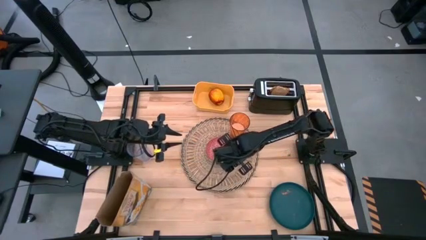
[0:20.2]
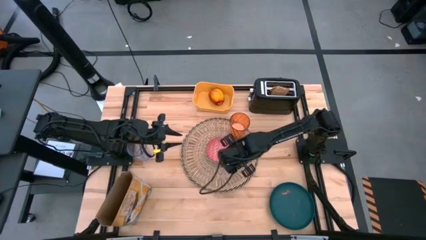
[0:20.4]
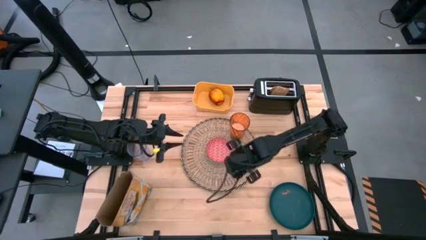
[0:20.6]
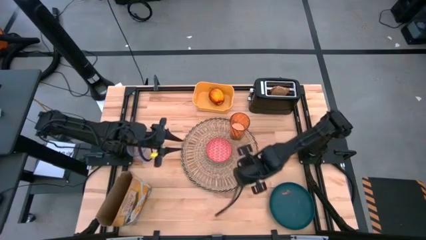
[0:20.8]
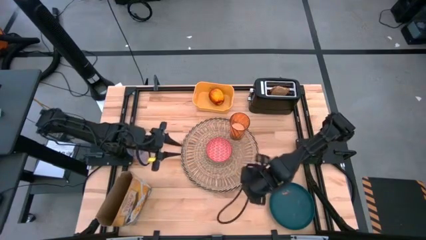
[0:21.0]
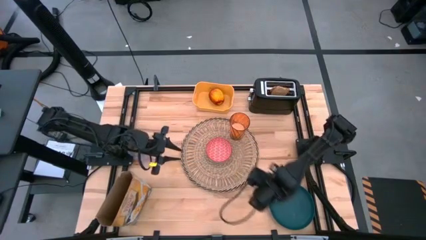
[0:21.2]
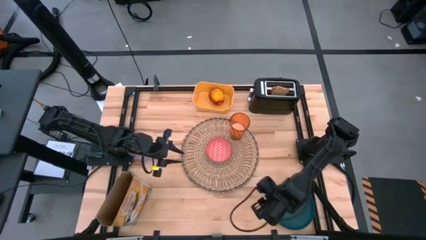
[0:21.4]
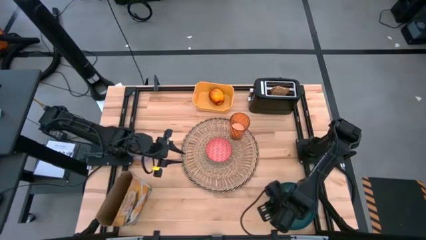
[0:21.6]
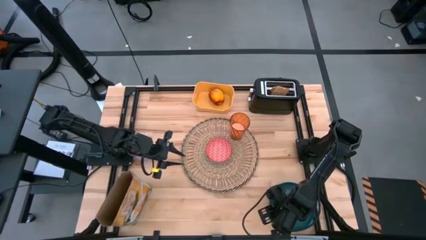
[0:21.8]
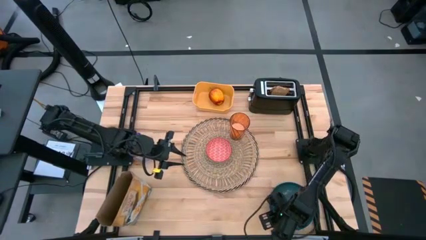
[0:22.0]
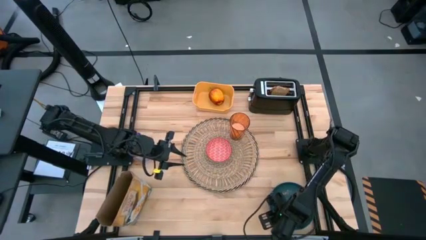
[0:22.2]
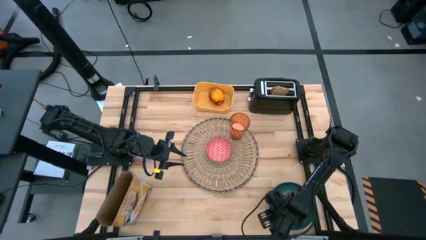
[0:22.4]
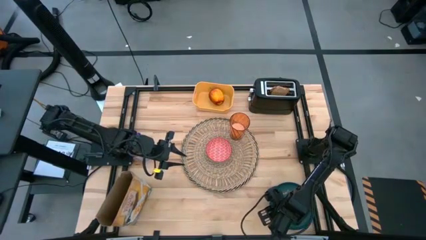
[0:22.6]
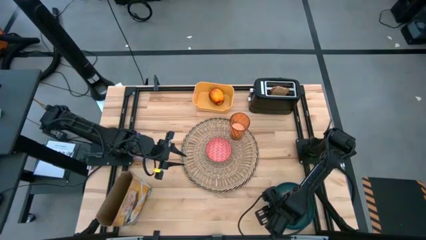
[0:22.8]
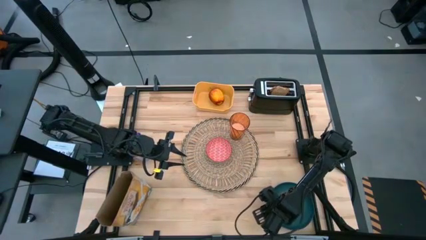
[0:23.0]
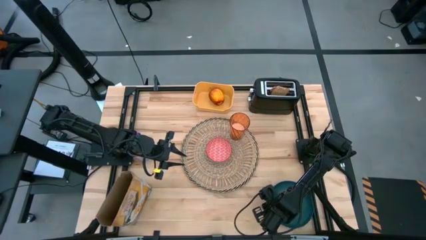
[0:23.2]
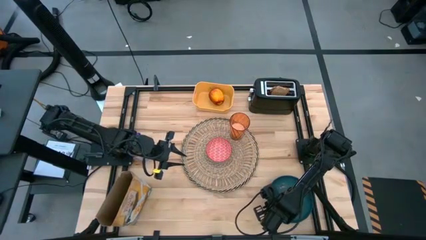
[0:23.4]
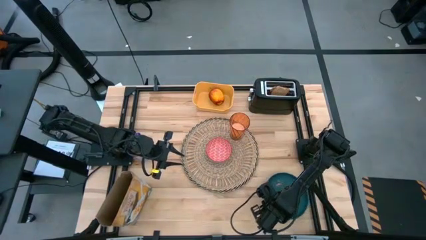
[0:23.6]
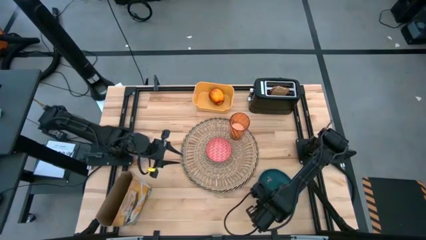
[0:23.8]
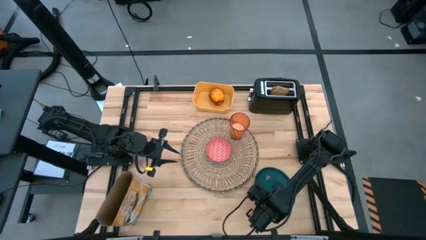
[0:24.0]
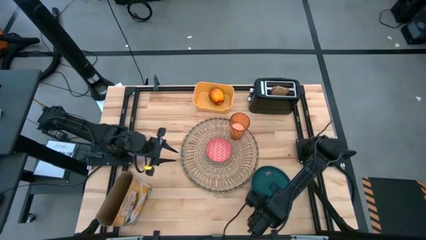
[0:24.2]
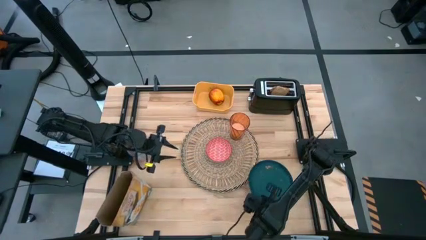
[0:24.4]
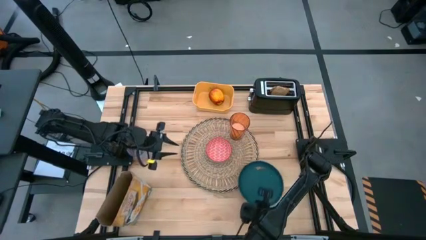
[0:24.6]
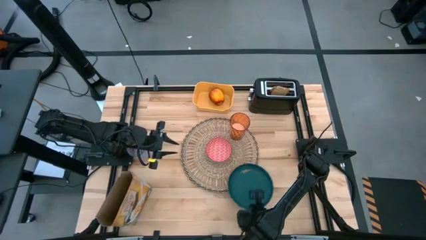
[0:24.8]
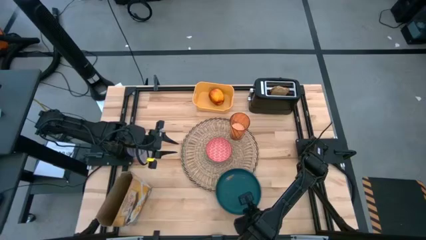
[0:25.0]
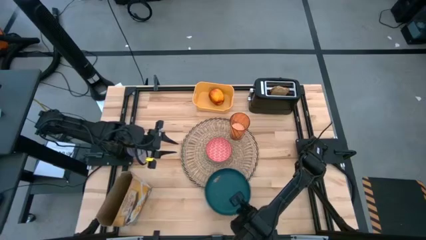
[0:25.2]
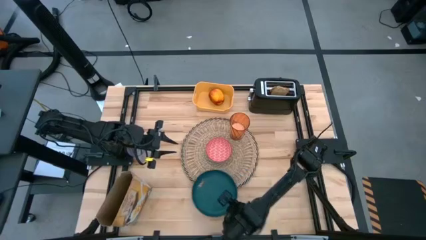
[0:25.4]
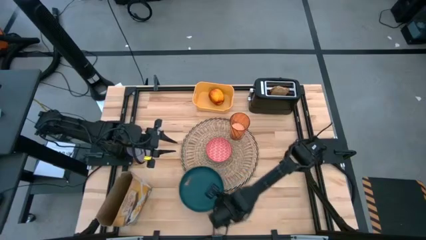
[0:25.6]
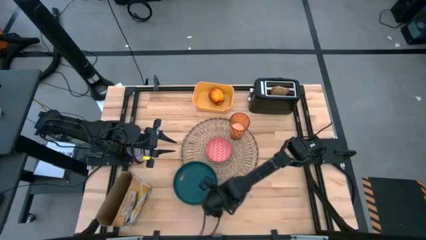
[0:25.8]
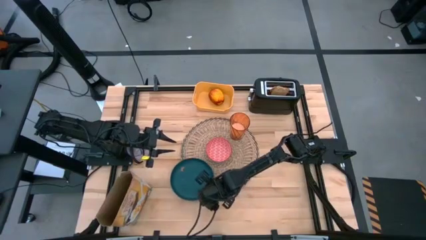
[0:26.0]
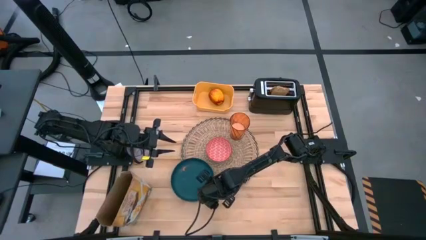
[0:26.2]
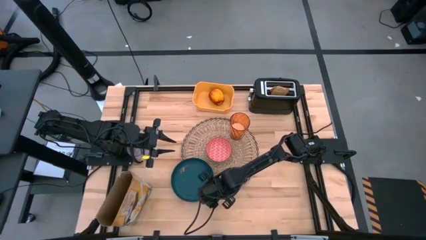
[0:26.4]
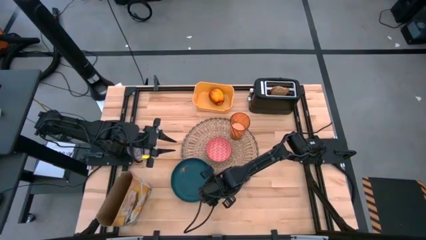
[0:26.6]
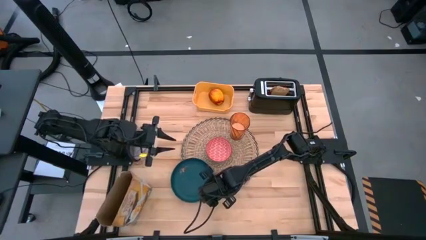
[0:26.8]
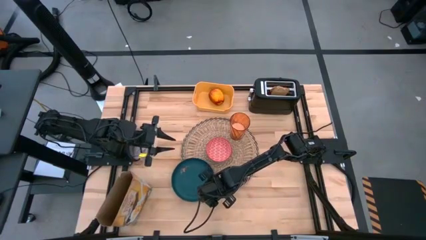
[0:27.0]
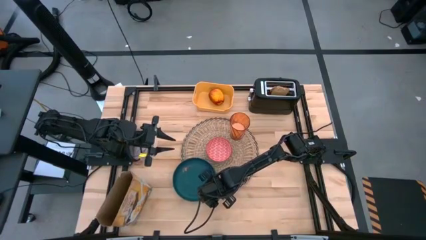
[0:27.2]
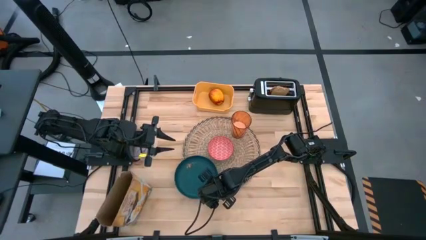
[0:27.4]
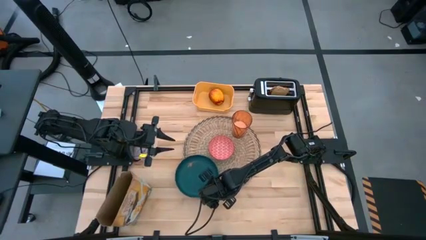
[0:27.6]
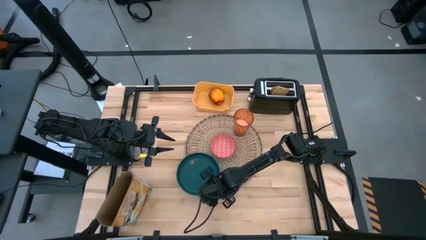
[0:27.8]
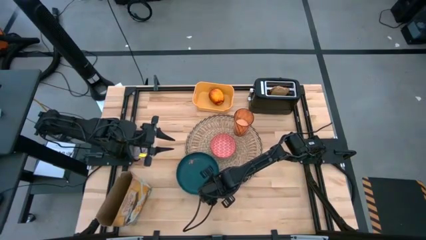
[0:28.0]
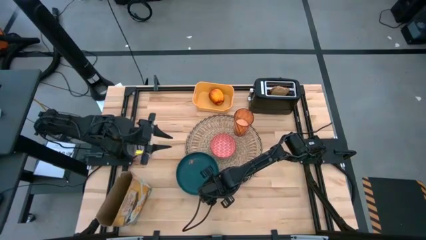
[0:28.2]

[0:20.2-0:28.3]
Task: Arrange a breakfast setting
Put the dark green plate on the brown table mat

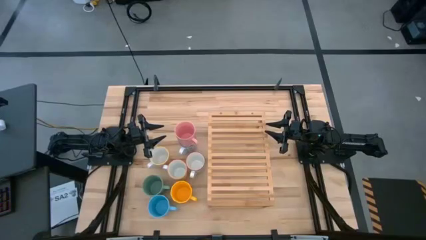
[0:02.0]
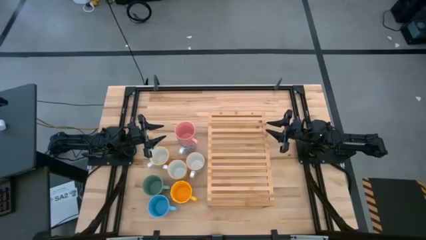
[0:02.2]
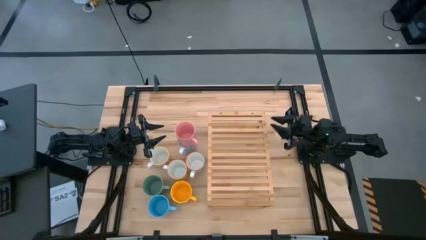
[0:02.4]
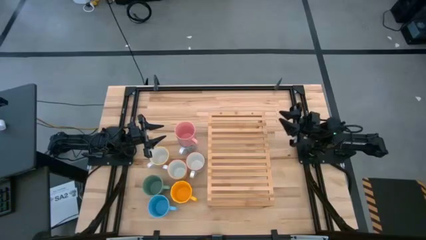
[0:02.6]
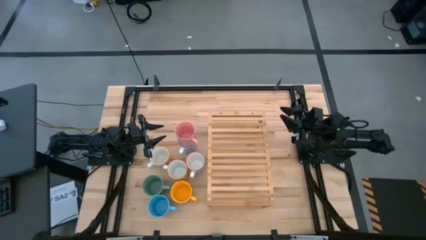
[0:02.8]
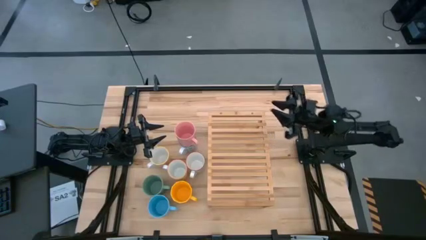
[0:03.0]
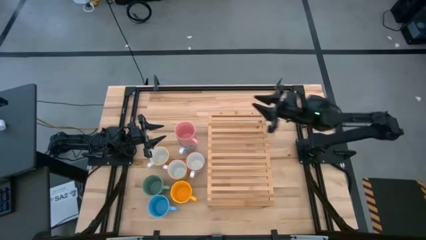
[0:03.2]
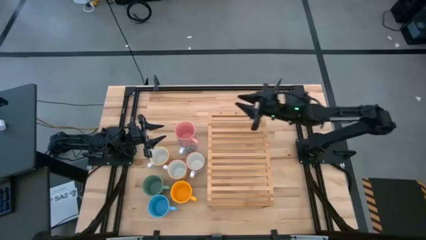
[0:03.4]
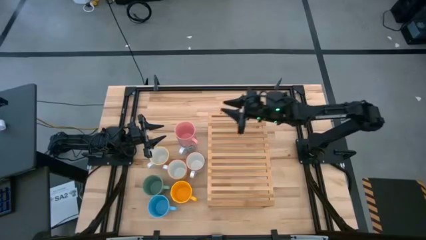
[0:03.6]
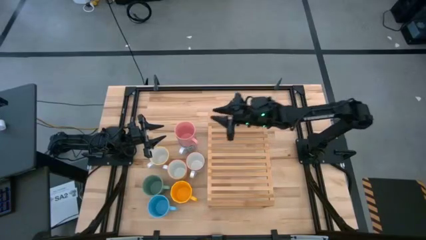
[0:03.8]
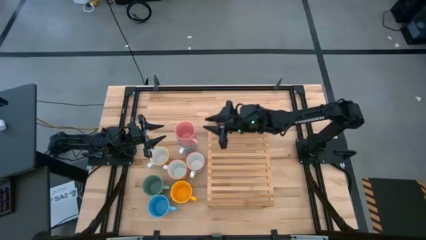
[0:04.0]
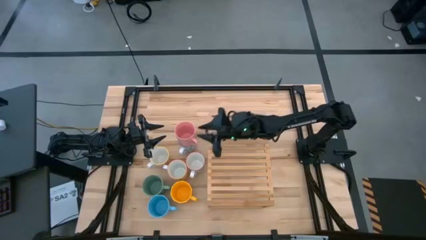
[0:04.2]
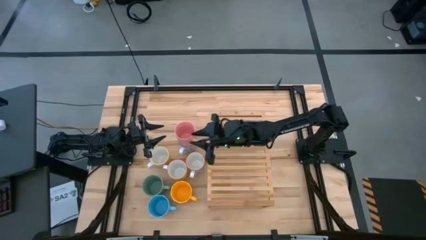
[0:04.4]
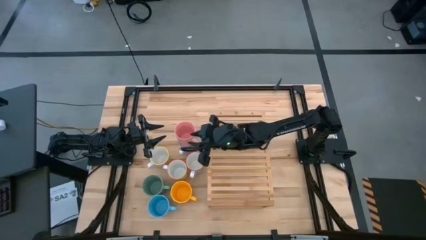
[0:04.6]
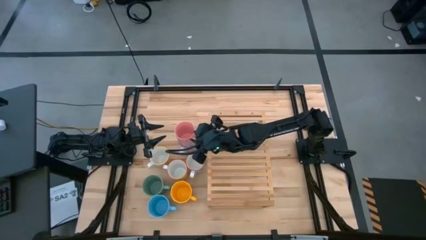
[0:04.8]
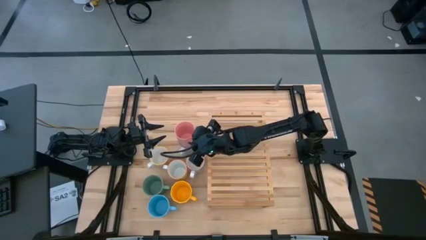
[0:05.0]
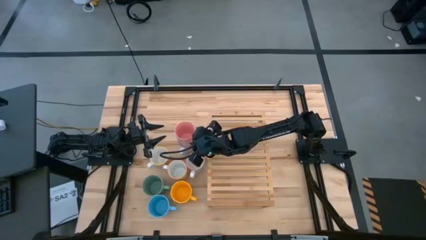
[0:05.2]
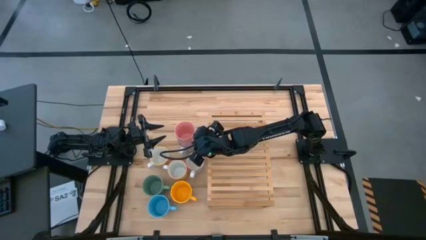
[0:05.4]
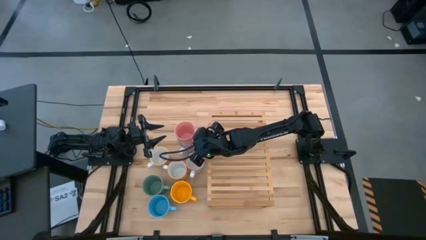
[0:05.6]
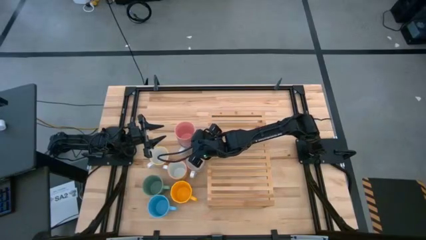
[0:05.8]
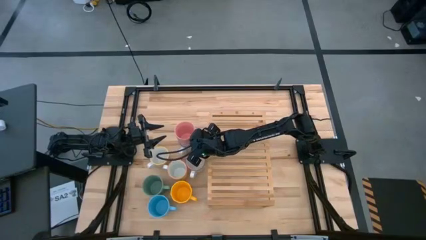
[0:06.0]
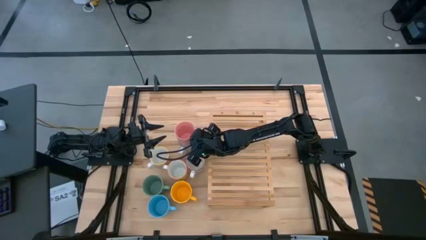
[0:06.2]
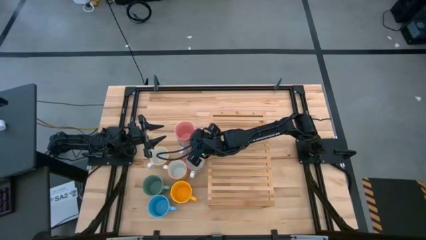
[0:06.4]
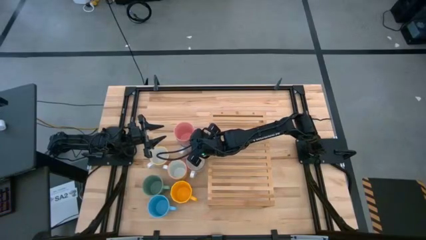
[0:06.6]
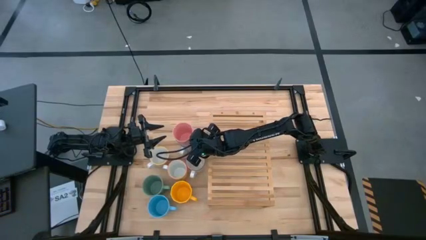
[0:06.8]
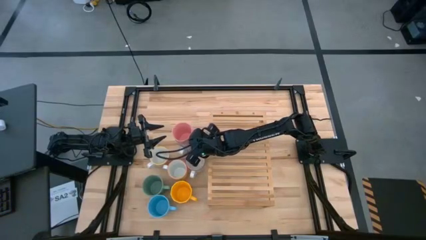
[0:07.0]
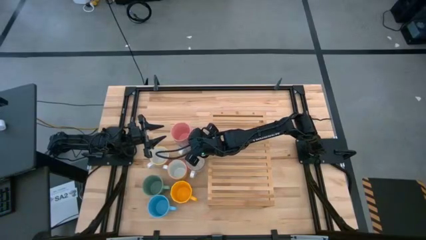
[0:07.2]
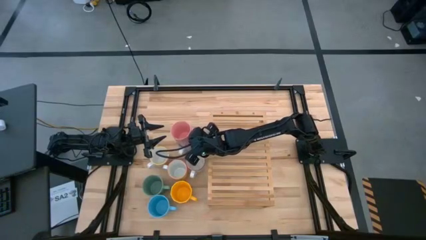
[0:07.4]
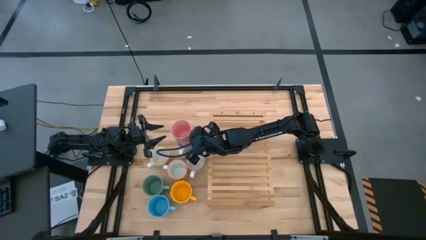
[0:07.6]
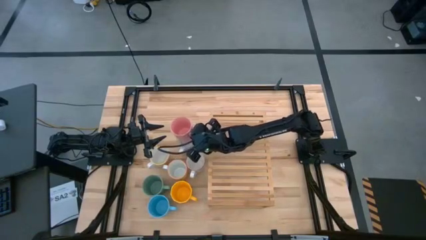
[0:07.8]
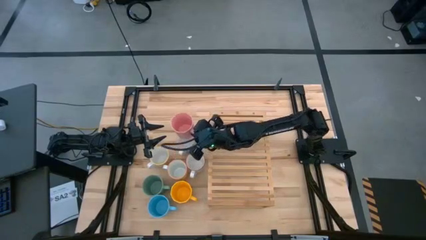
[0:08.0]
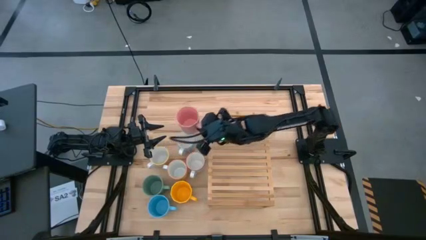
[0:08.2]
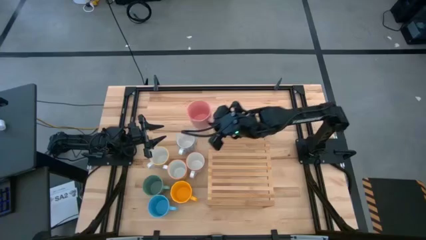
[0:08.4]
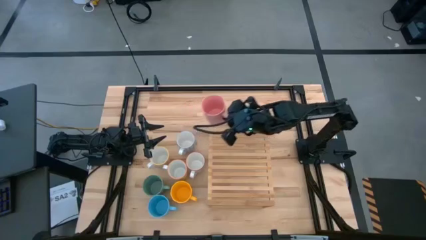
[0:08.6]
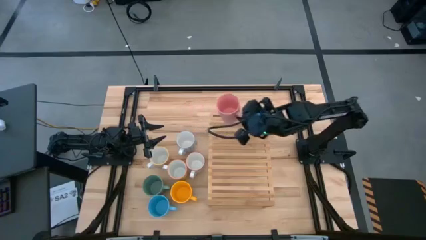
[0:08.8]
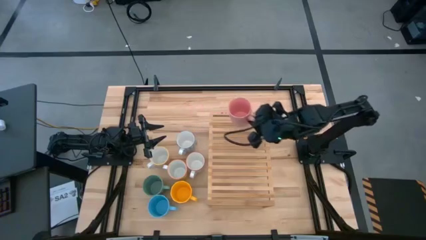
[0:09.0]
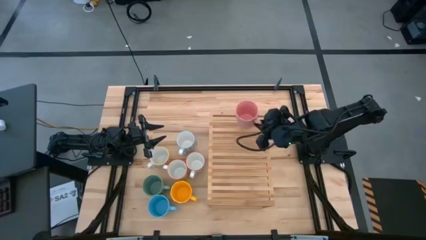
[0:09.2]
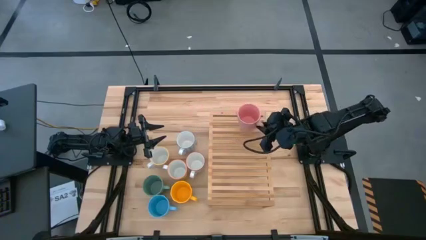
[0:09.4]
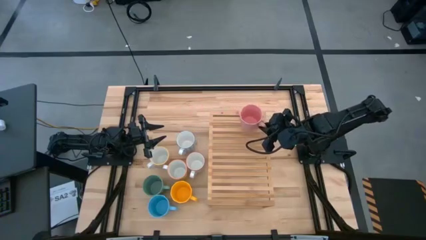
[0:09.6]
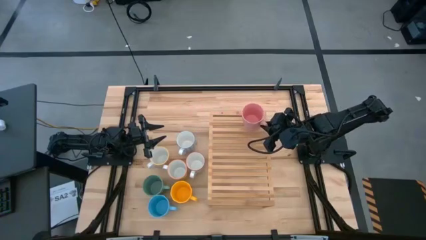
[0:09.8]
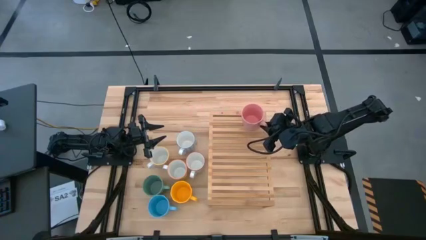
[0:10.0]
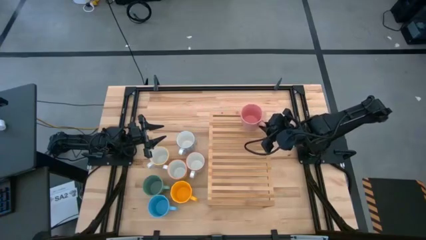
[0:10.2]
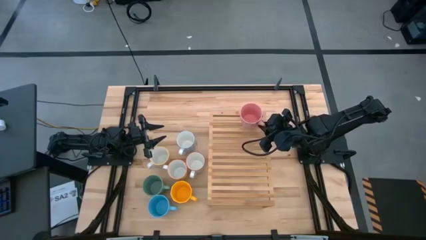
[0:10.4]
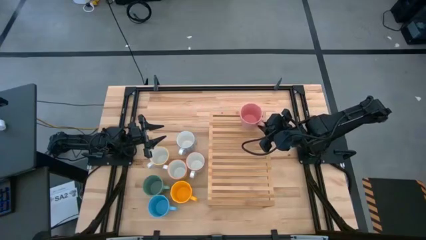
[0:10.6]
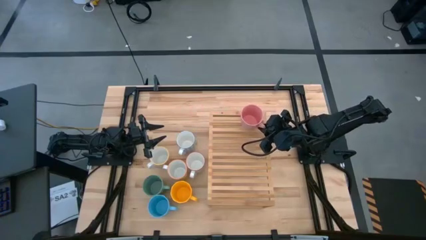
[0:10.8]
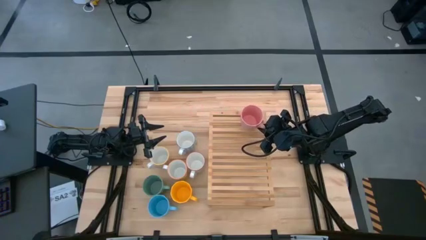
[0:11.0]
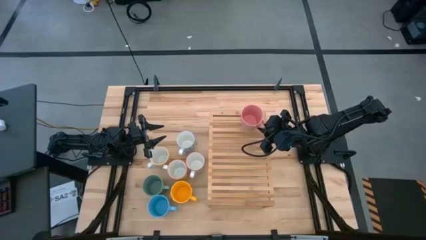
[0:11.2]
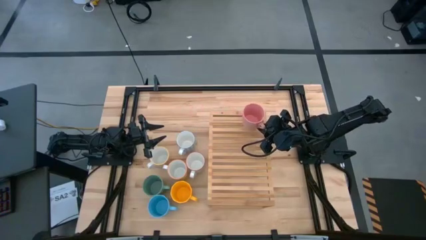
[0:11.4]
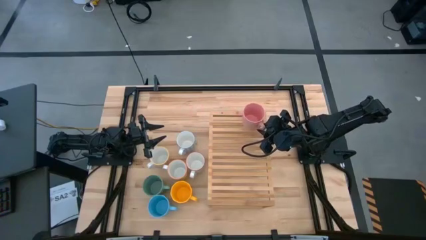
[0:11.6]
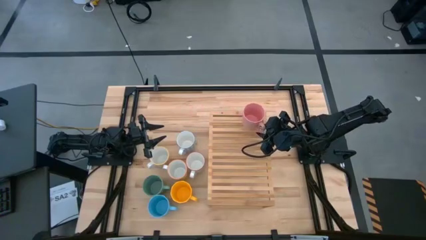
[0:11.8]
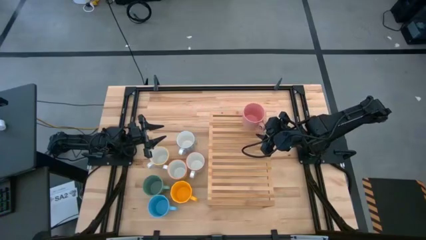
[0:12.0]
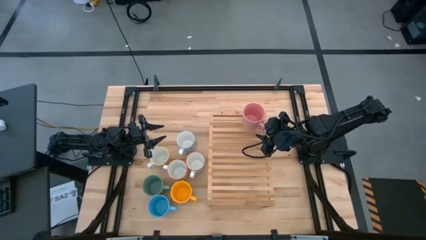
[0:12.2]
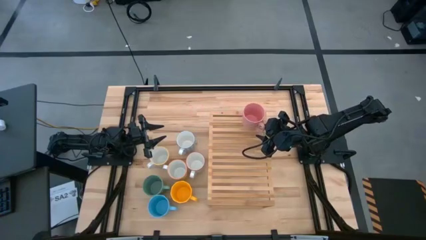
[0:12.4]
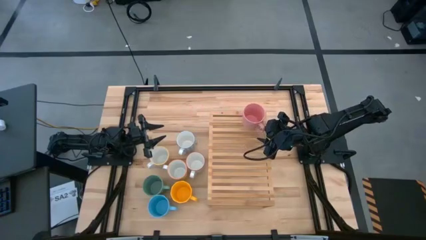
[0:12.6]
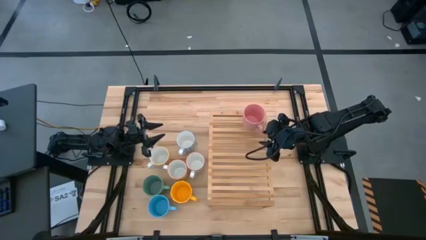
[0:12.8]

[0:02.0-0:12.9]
Task: Place coffee mugs
Put the pink mug on the shelf
